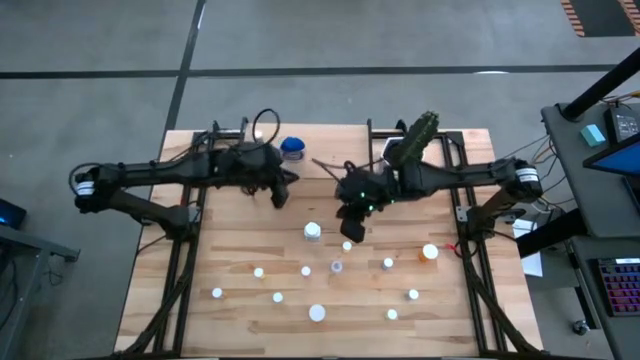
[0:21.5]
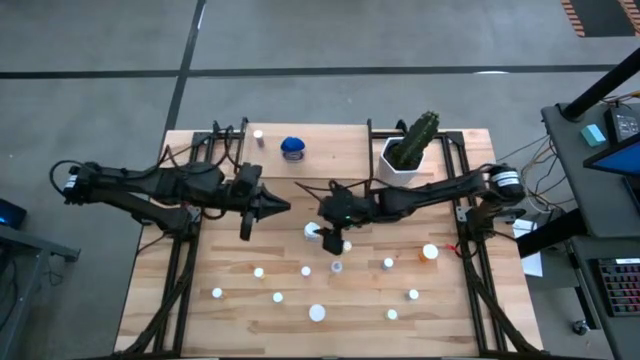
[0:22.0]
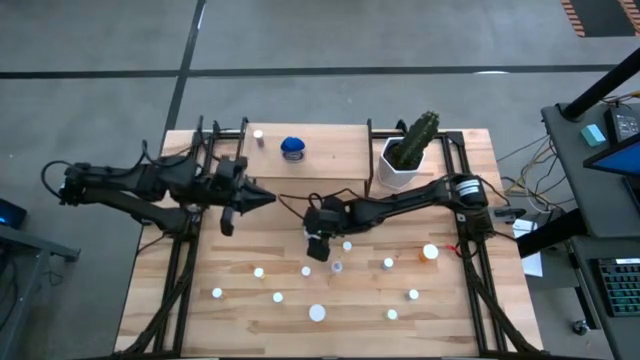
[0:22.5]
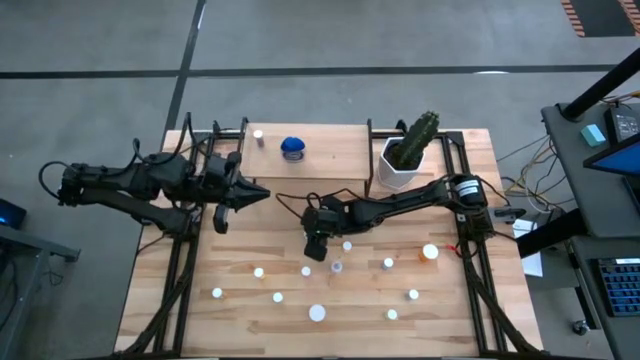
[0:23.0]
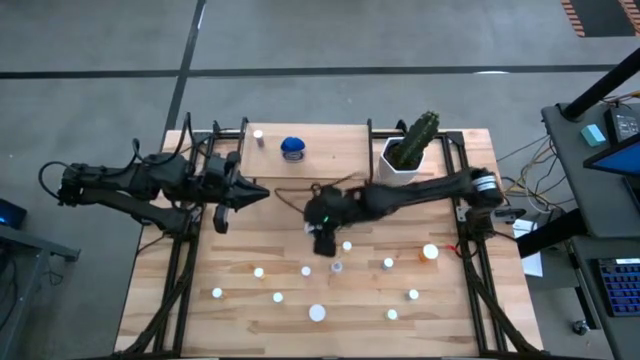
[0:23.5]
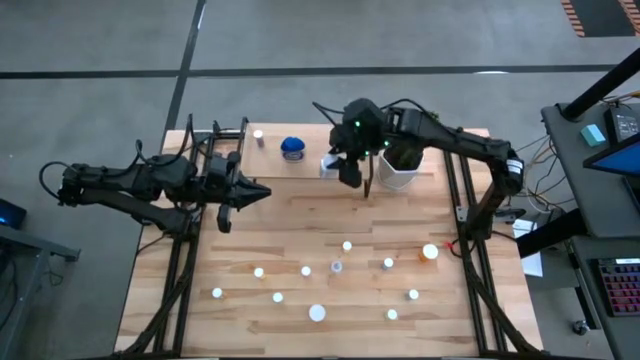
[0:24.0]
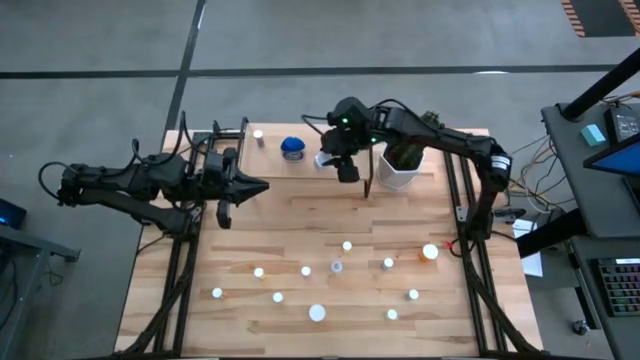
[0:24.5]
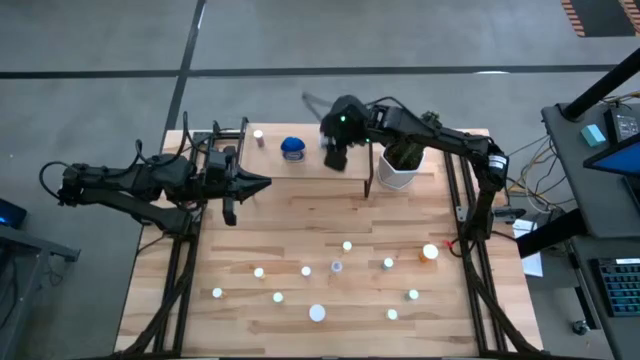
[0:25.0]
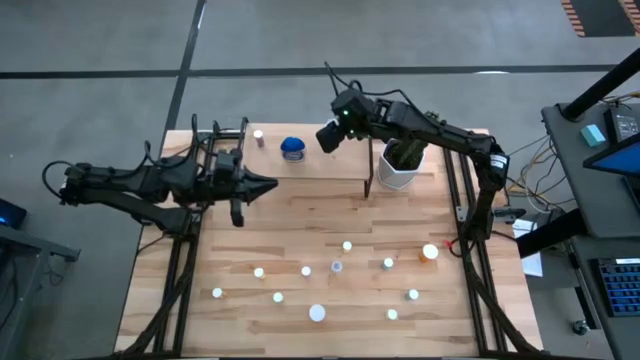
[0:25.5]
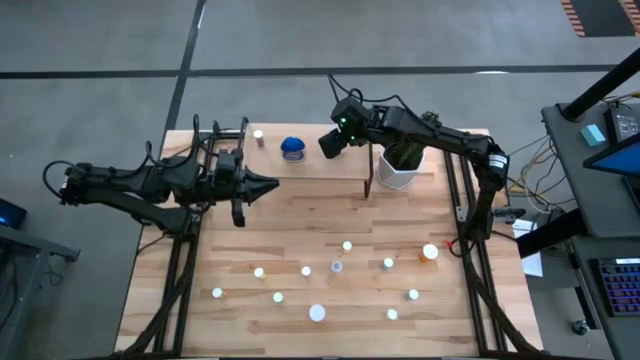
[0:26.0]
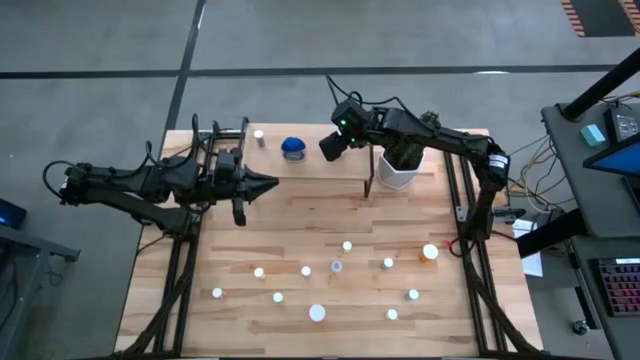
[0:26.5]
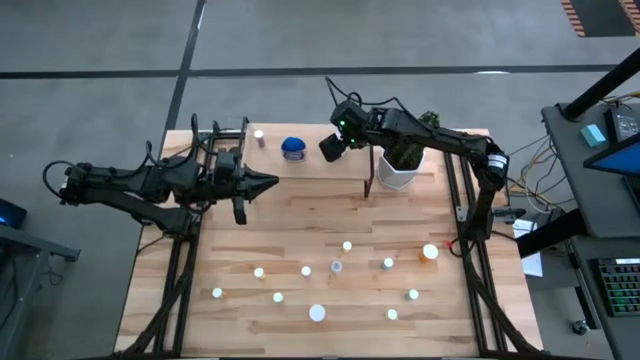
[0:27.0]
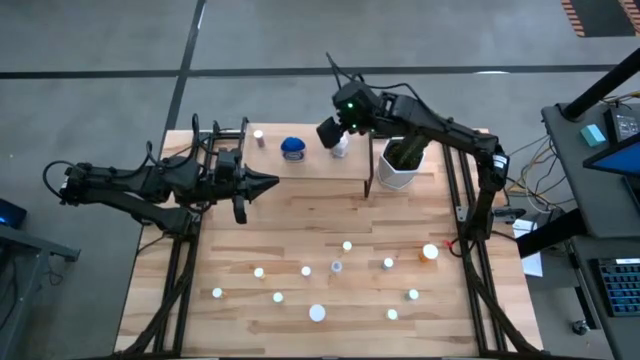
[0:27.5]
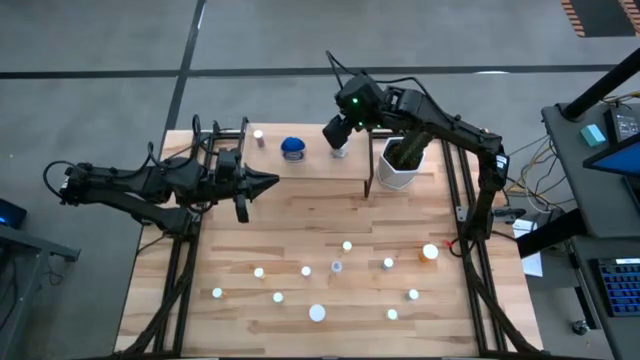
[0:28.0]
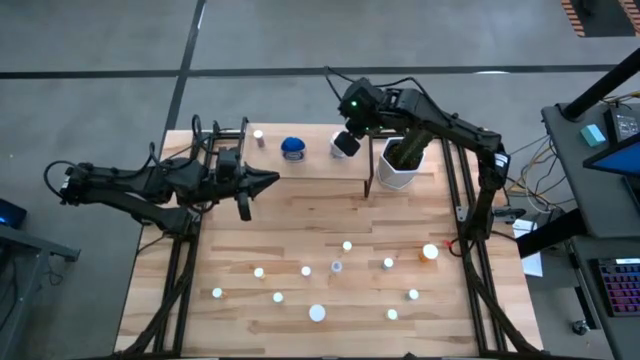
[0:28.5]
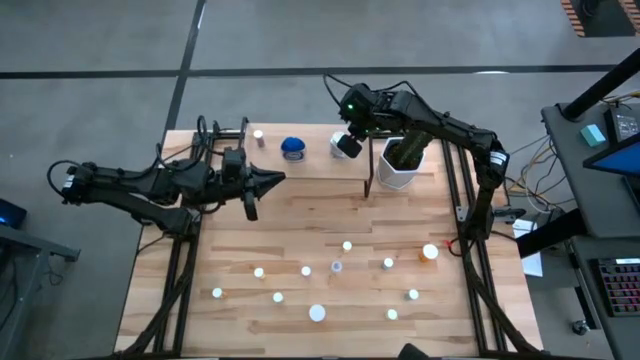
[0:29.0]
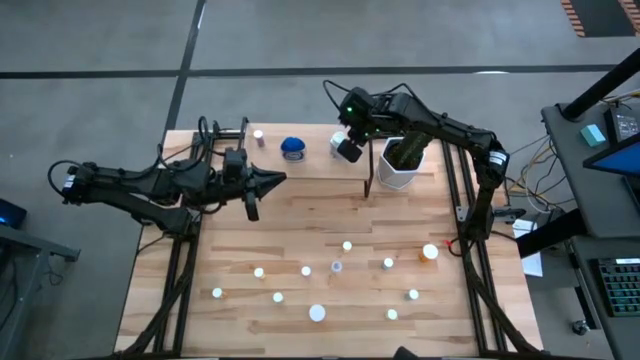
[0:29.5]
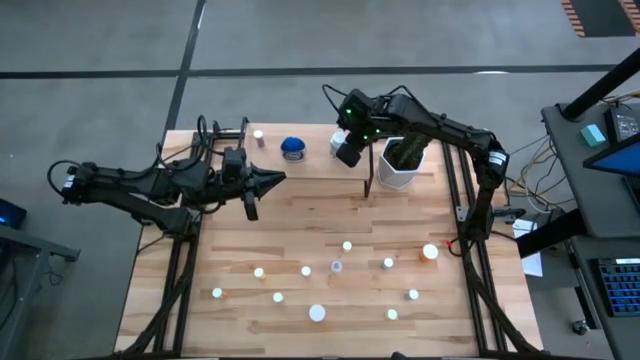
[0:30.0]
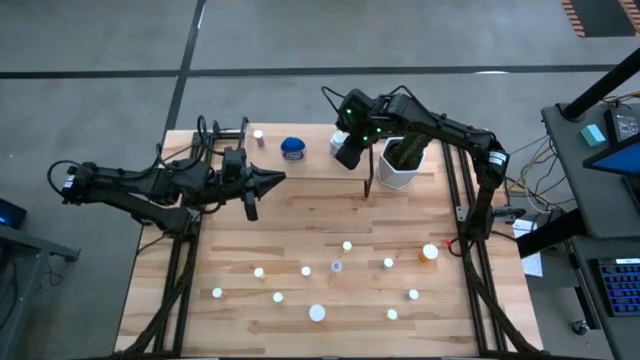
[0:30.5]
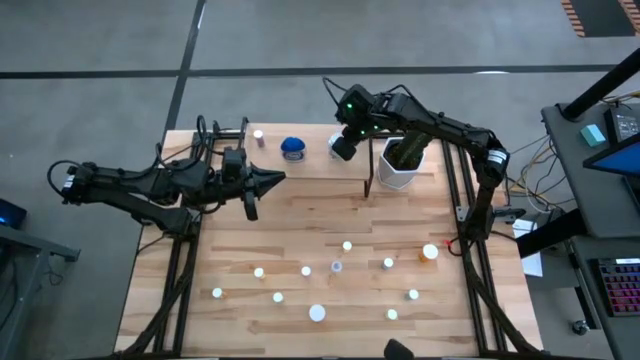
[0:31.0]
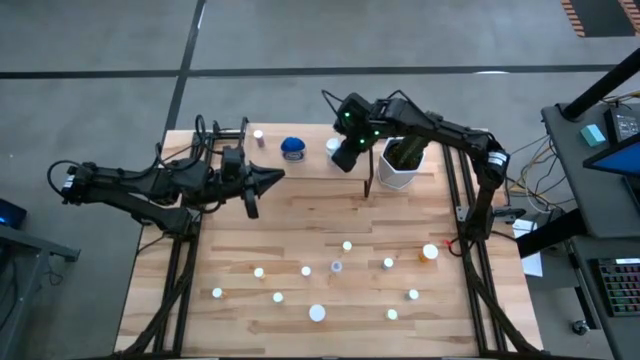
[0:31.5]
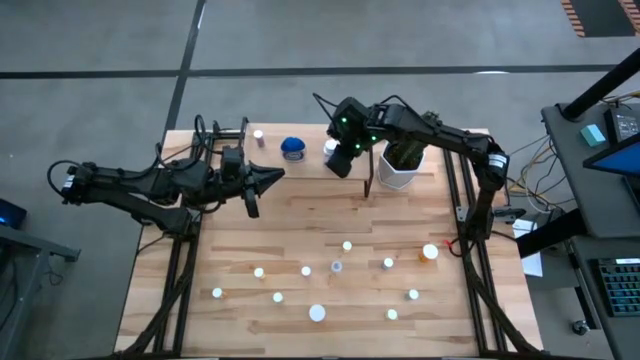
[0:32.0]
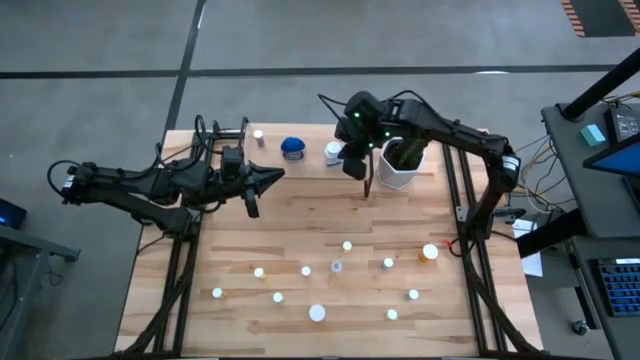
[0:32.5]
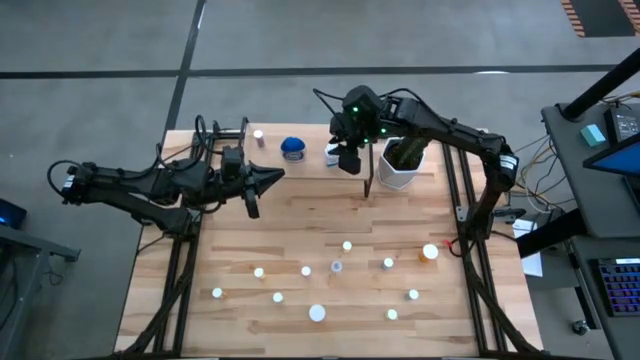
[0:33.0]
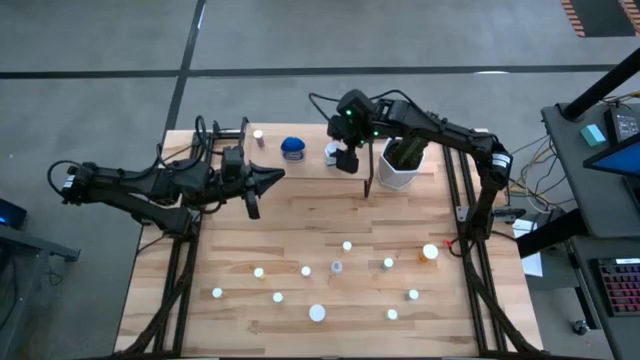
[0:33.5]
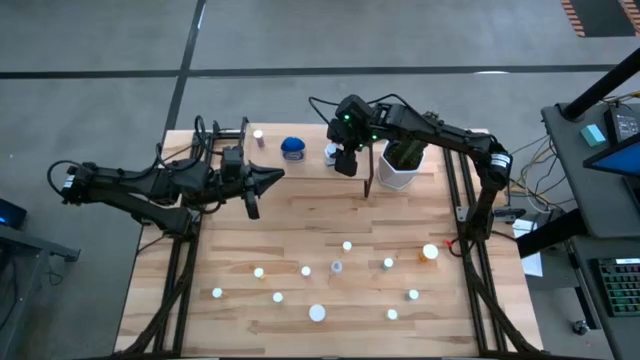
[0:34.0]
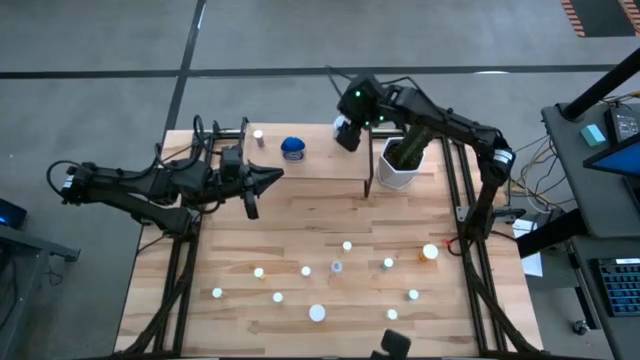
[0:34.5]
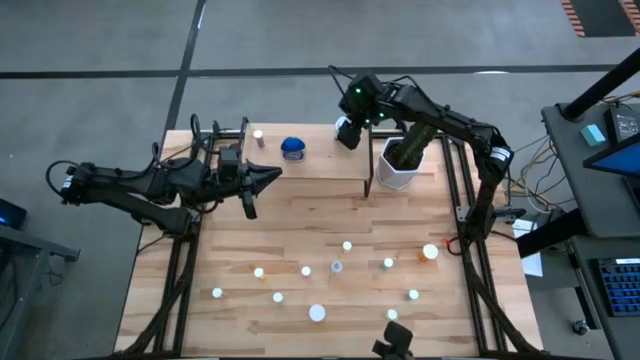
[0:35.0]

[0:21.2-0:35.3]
Task: Pick and place medicine bottles onto shelf by color
Put the white pill bottle on the shelf

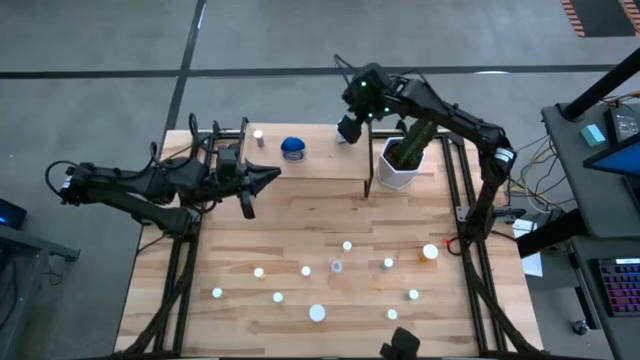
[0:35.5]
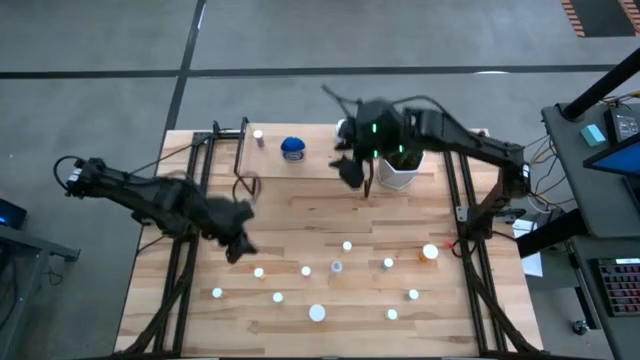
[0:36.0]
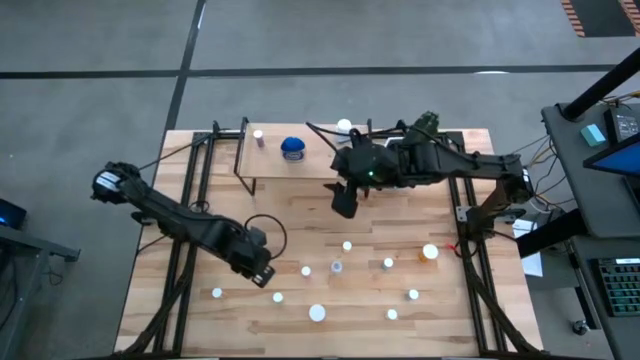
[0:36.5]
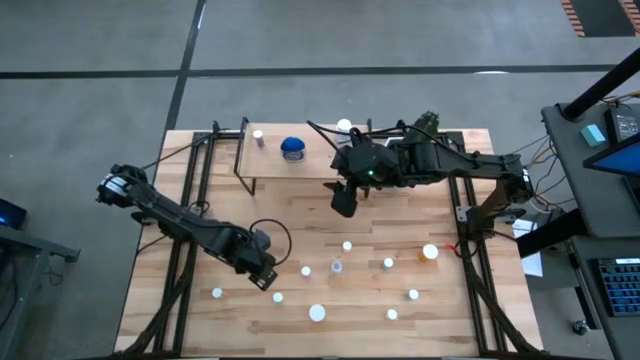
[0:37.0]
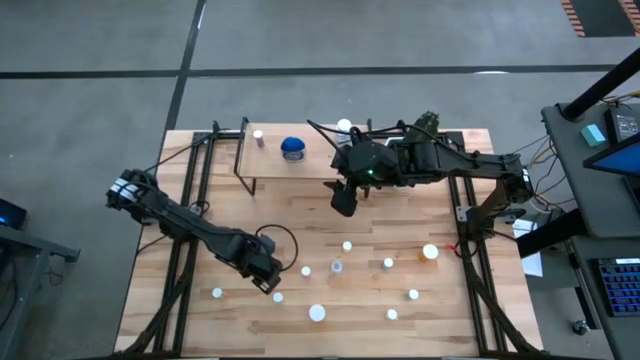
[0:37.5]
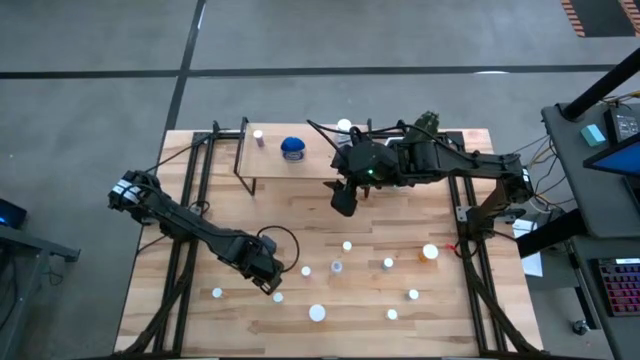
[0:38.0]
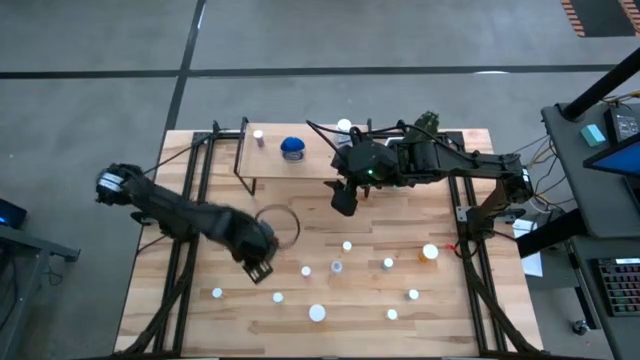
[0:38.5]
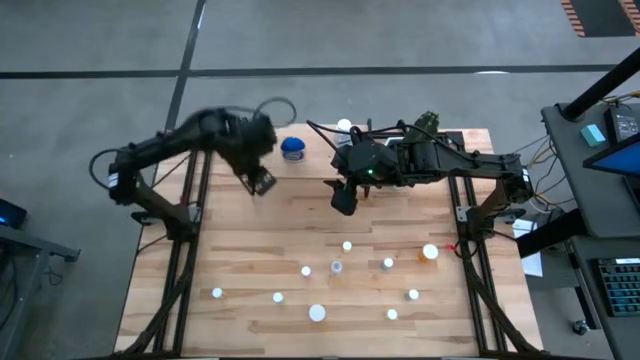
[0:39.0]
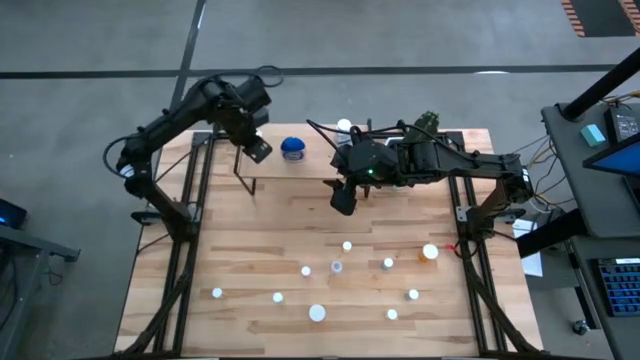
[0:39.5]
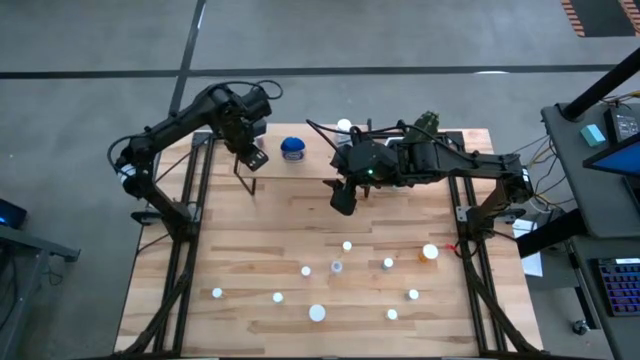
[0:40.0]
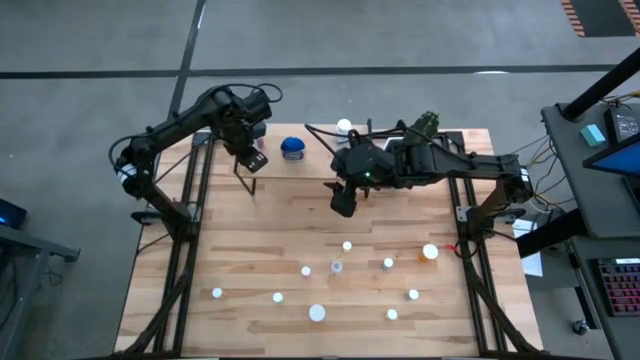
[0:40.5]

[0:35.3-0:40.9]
Put the yellow pill bottle on the shelf

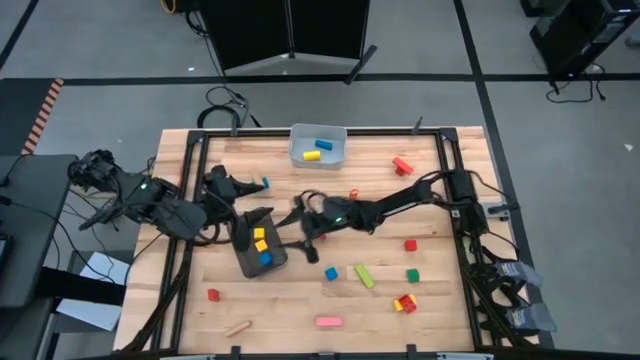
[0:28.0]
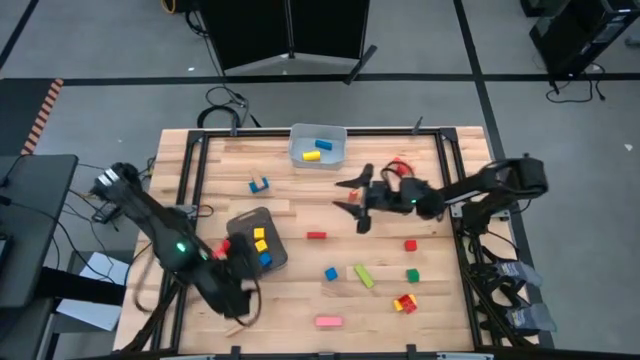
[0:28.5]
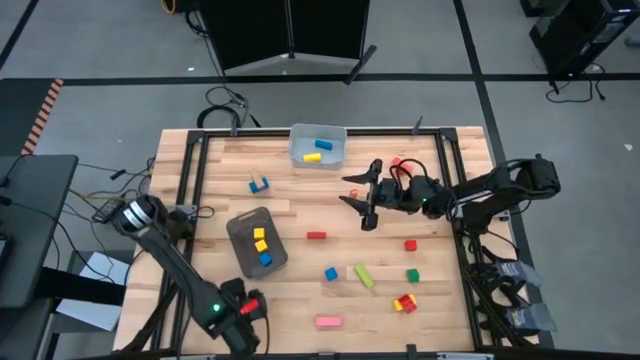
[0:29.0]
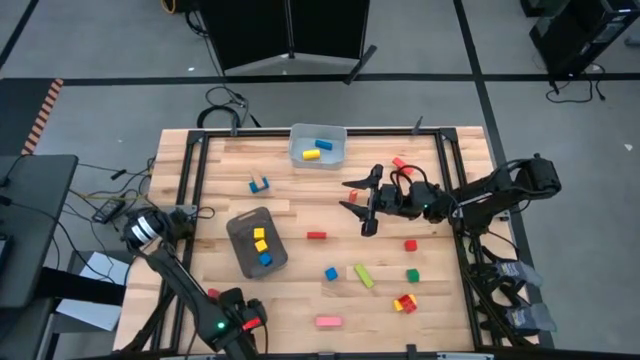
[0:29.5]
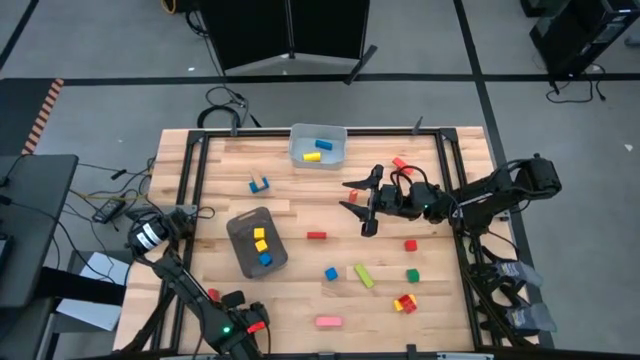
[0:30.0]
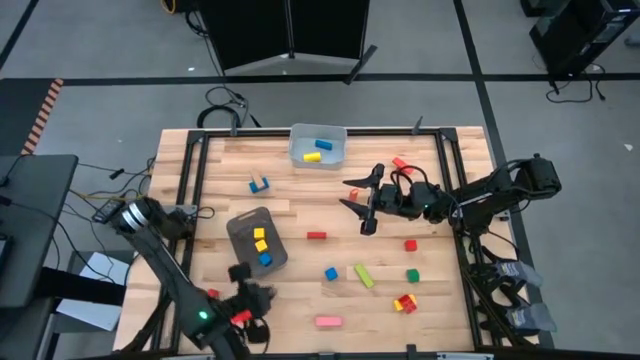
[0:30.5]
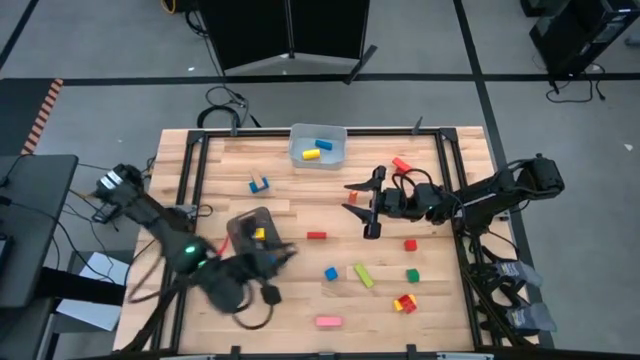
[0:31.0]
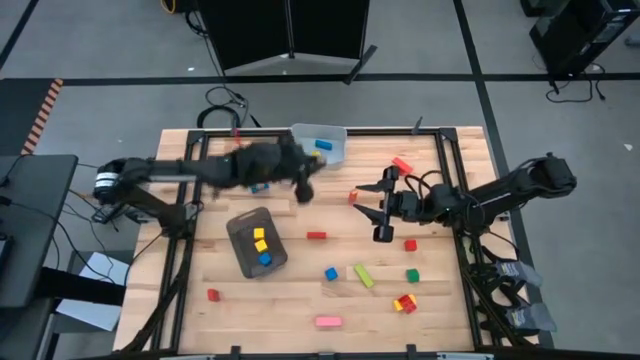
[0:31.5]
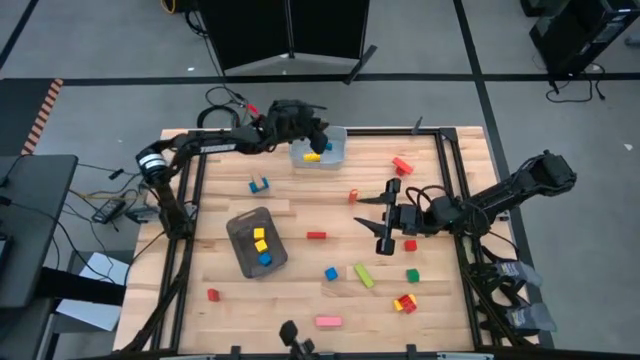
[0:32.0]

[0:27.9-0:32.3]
Task: Sort blocks by size
Put the brown rectangular block into the gray bin
